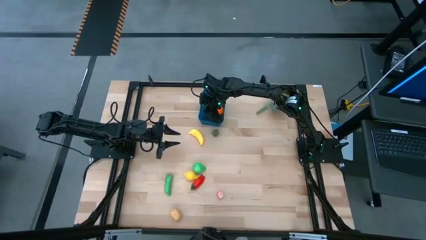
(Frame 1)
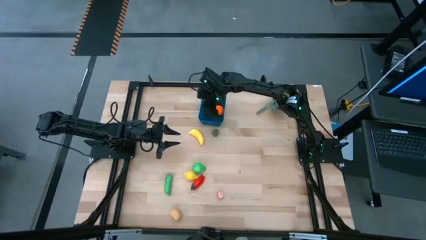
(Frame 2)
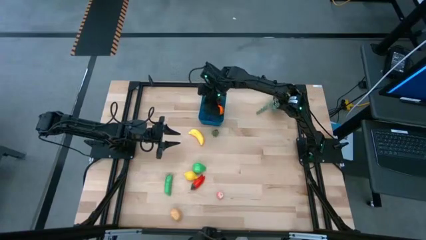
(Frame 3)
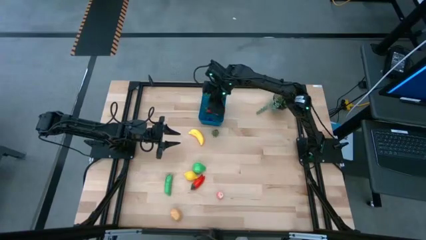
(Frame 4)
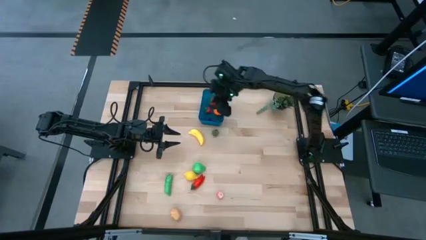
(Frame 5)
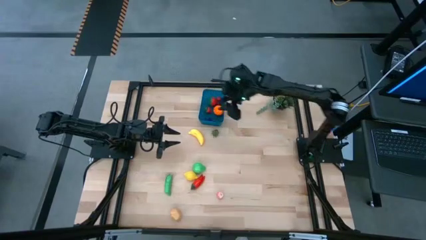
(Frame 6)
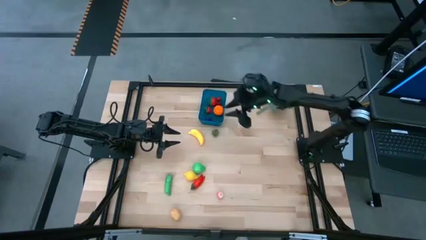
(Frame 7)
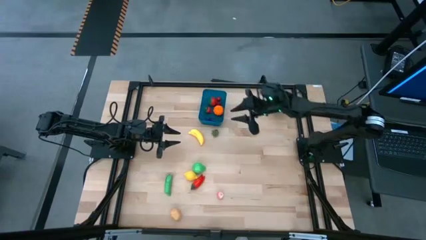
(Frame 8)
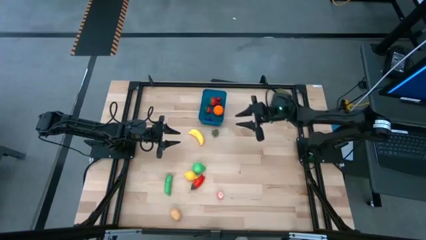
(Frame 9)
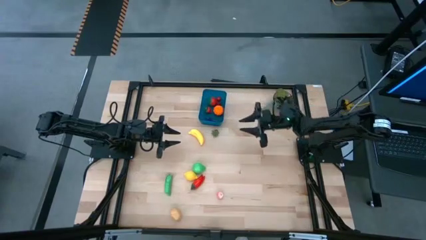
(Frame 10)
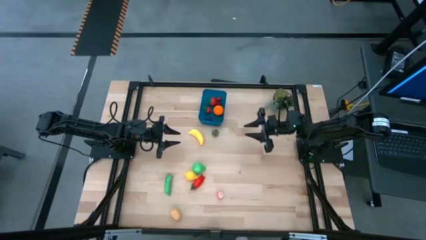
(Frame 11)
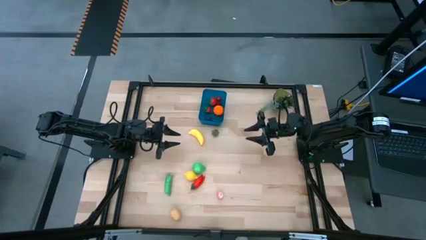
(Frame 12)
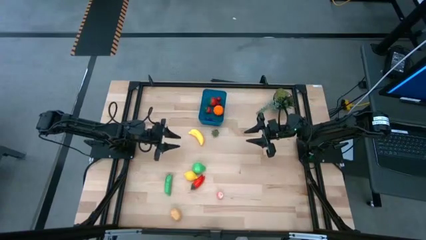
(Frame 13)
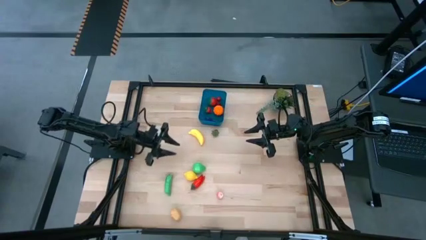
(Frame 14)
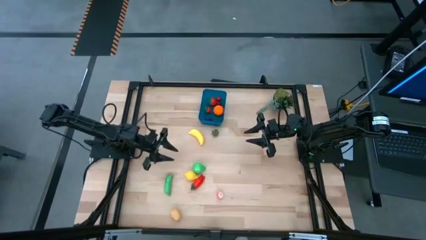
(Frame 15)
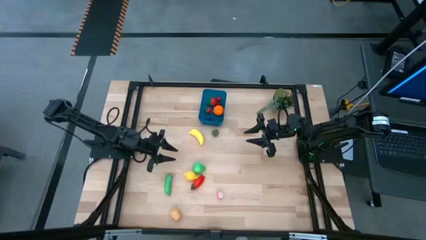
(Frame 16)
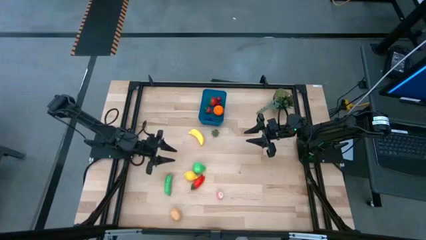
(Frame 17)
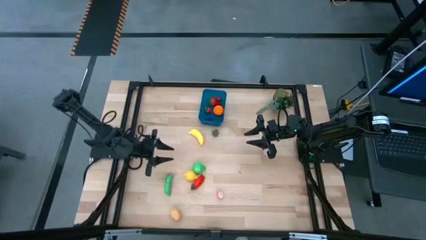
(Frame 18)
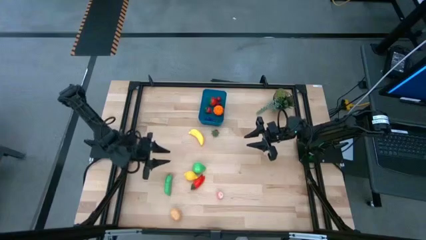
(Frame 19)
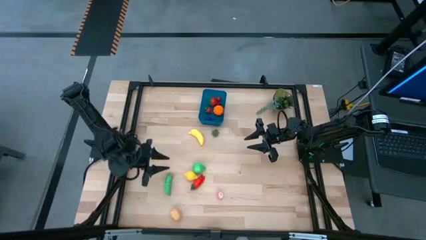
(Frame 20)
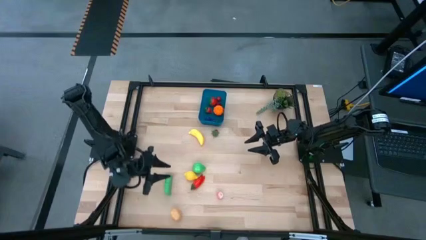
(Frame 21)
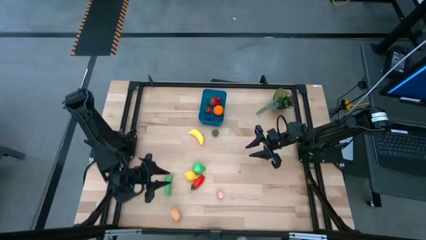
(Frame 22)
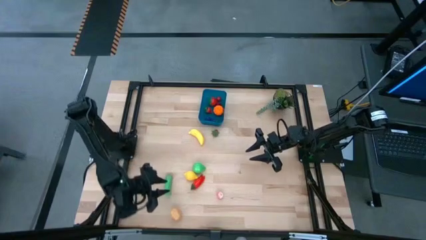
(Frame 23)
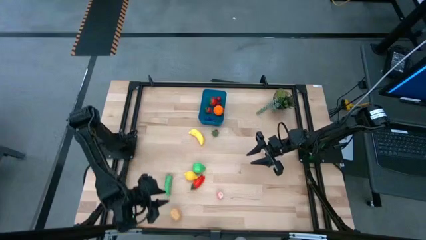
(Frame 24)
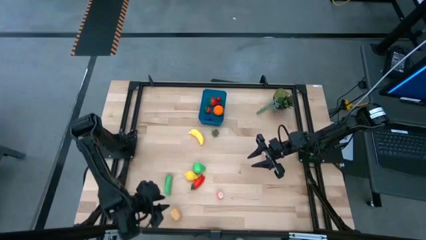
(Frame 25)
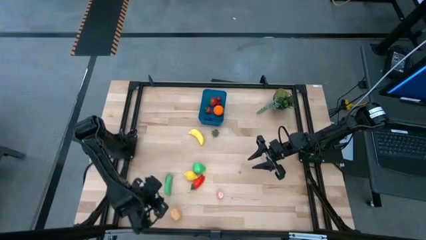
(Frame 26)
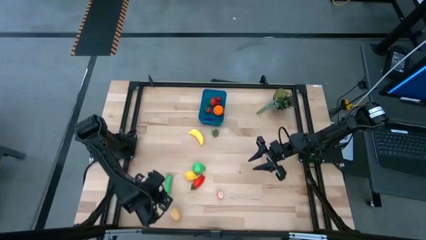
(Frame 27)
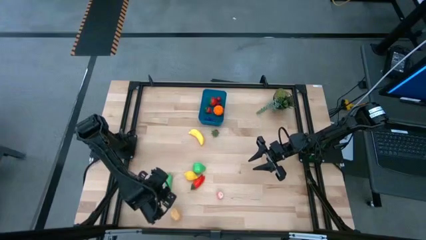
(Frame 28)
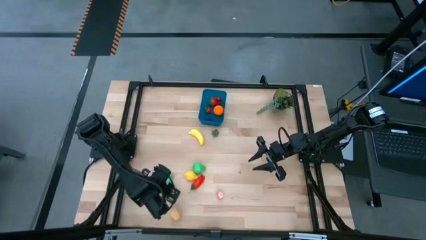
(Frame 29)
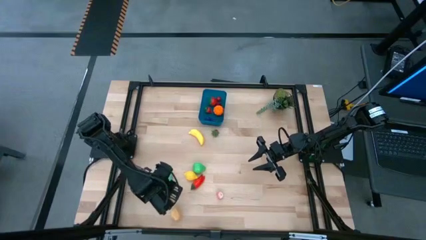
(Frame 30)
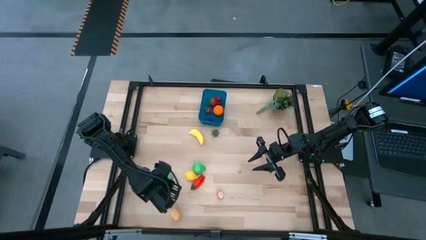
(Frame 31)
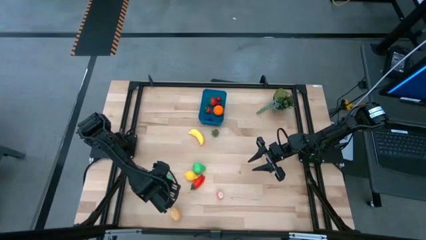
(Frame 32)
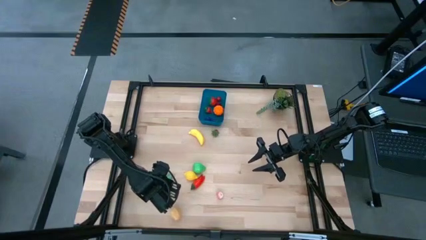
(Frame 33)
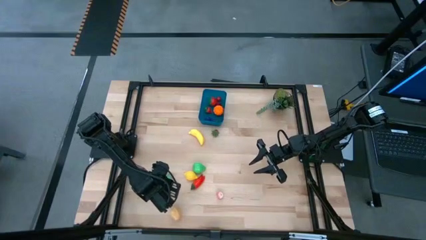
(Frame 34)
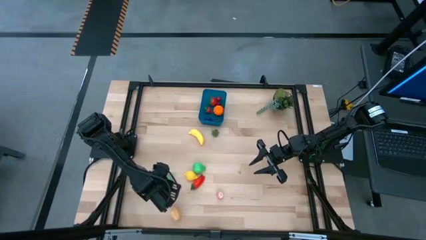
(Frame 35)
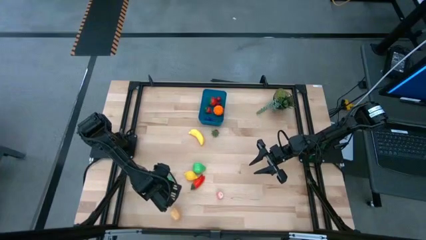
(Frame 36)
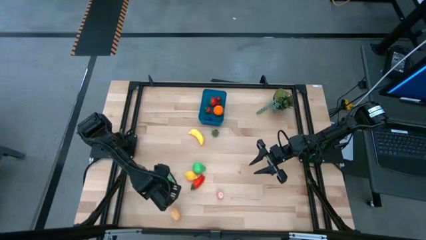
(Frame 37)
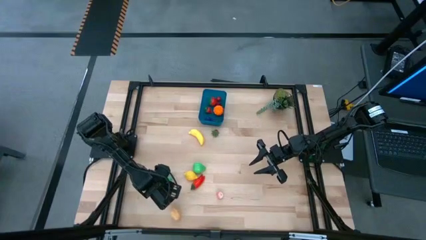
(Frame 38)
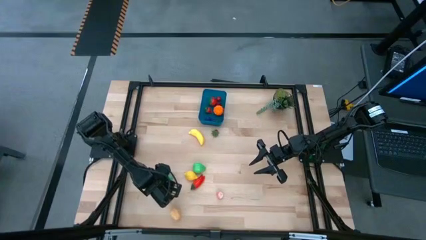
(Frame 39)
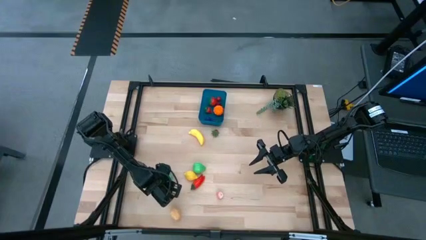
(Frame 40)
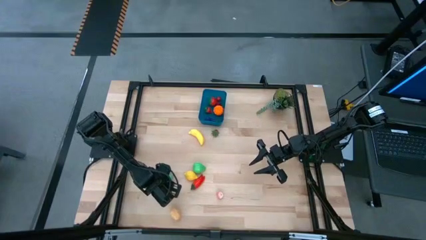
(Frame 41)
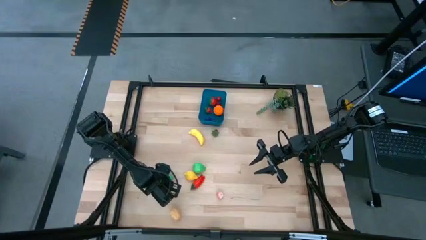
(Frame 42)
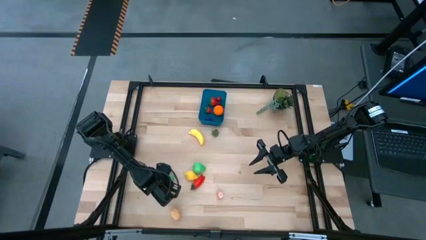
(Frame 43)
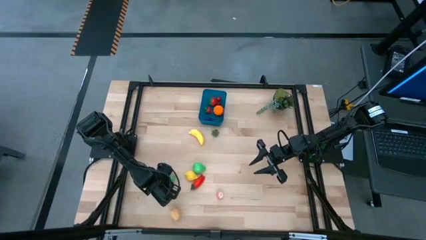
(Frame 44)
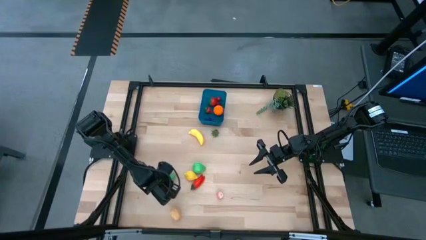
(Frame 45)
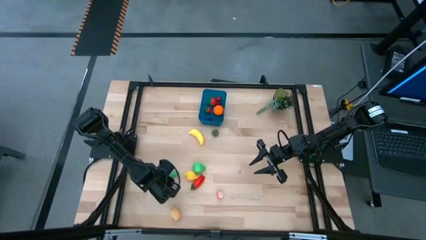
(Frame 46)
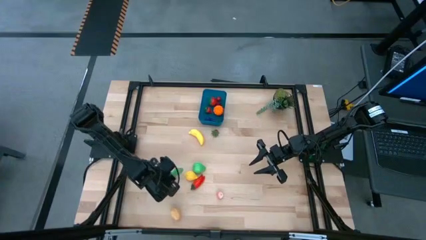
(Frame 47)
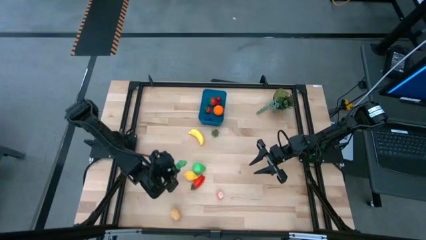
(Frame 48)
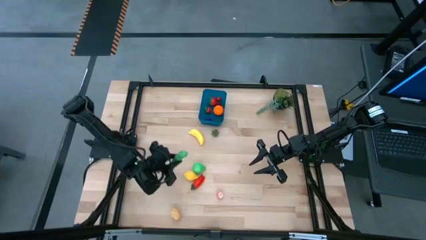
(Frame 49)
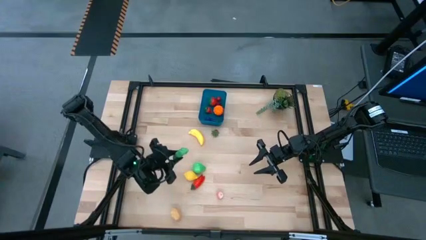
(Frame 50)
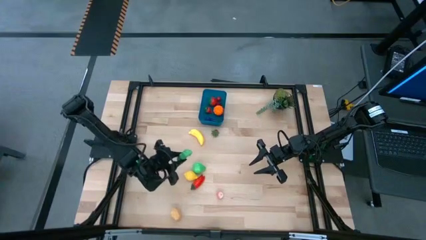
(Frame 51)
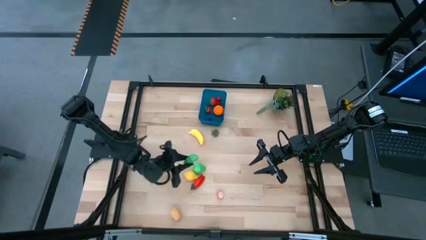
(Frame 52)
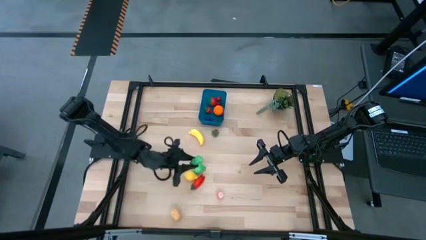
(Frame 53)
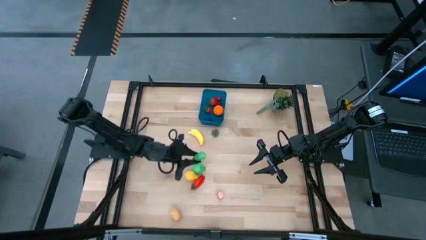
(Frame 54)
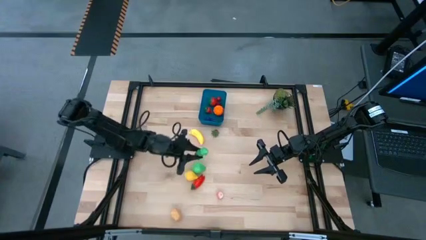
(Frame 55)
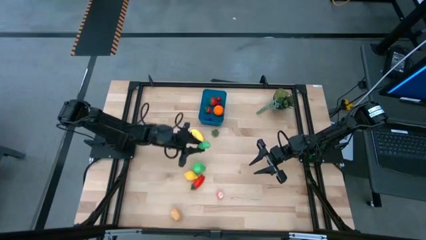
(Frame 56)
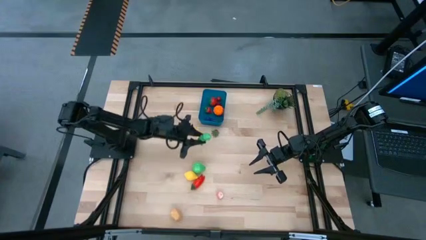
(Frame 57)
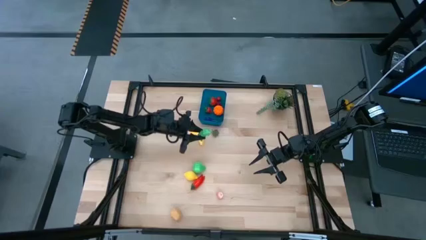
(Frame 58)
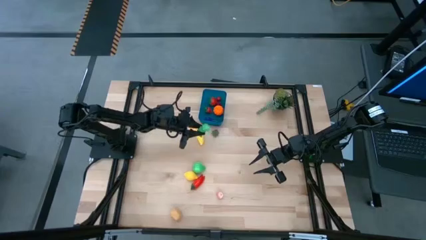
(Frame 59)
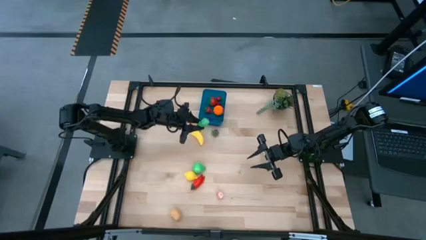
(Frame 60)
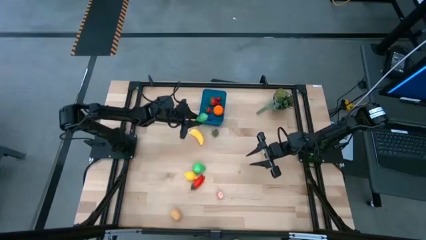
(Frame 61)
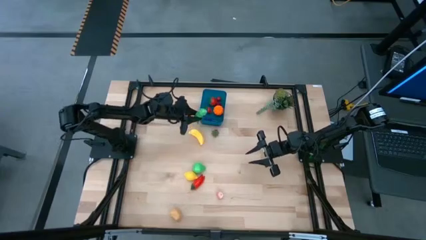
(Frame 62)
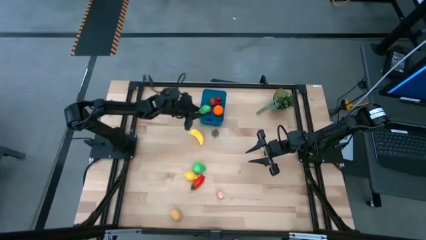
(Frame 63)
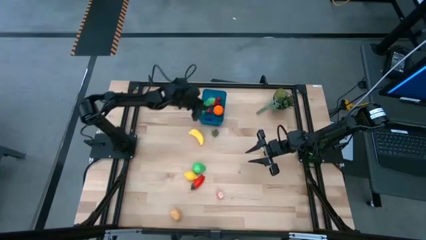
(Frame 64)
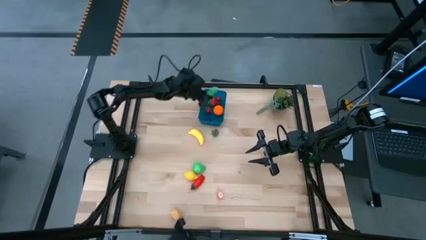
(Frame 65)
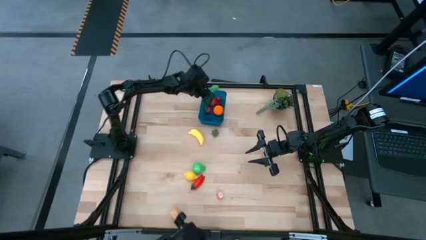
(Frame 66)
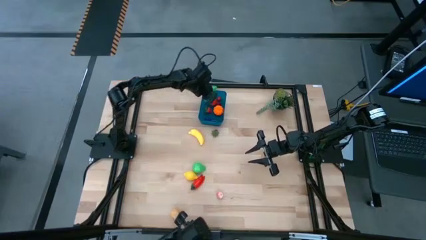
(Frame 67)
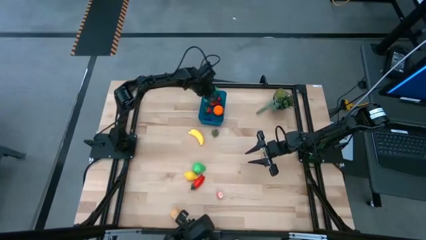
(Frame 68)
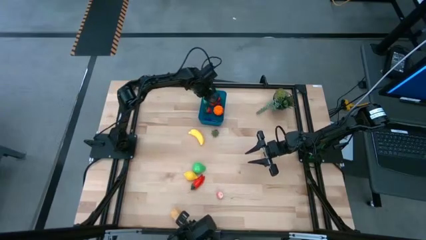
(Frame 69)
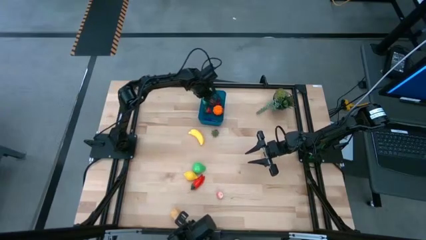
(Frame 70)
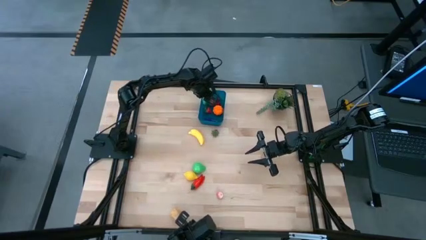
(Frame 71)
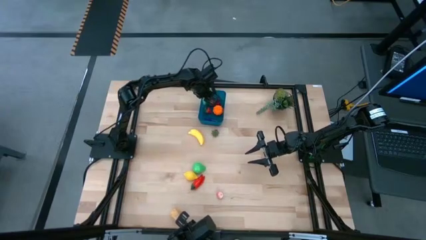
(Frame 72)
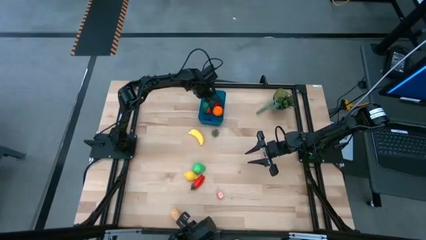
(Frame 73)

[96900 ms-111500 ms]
Task: Pick and placing Produce into tupperware
Put the pea into the blue bin

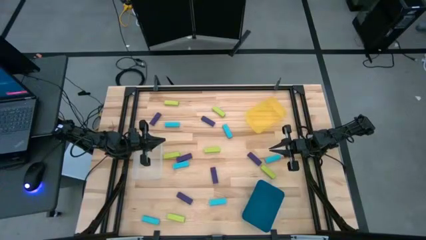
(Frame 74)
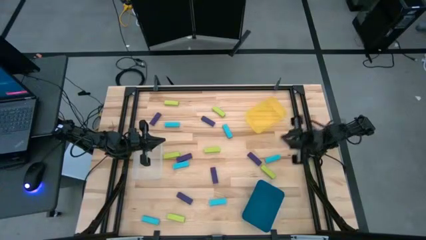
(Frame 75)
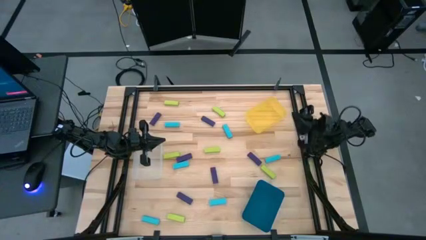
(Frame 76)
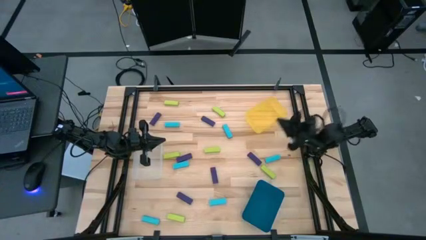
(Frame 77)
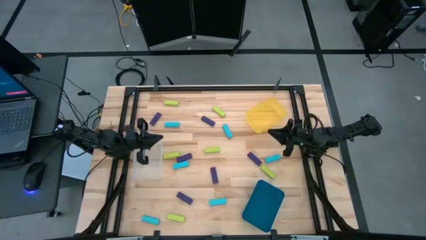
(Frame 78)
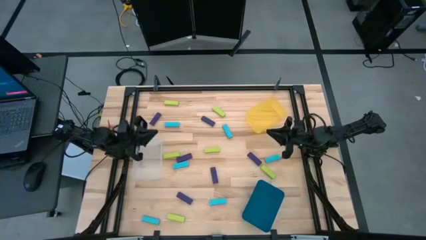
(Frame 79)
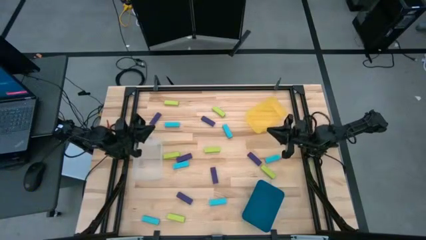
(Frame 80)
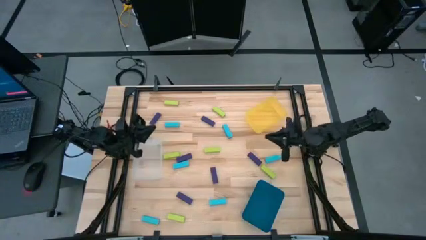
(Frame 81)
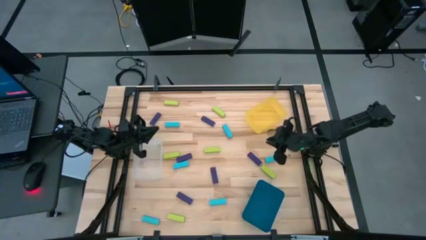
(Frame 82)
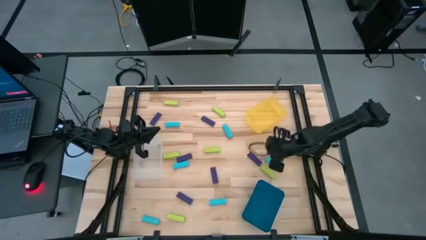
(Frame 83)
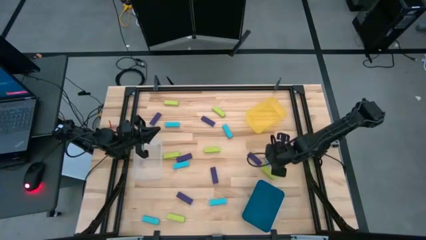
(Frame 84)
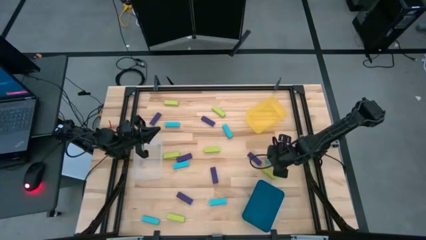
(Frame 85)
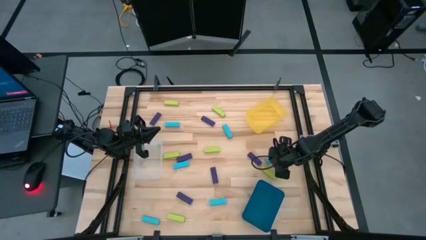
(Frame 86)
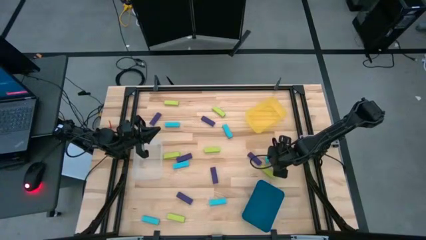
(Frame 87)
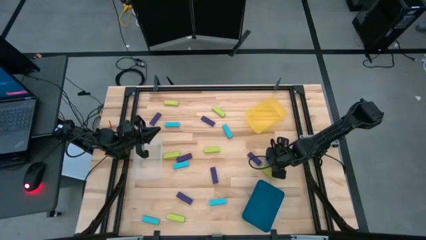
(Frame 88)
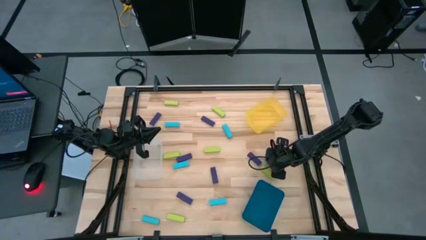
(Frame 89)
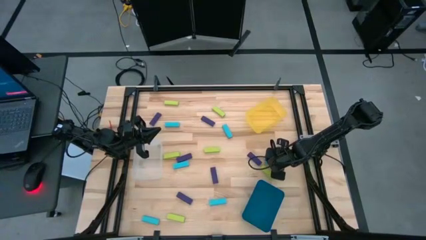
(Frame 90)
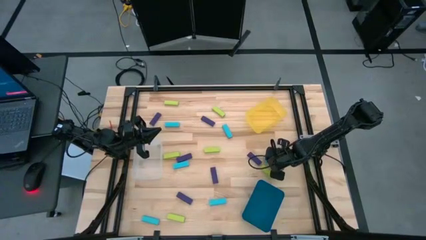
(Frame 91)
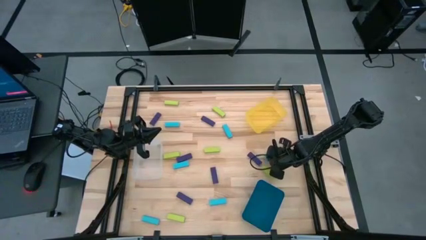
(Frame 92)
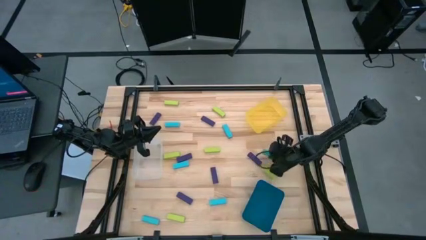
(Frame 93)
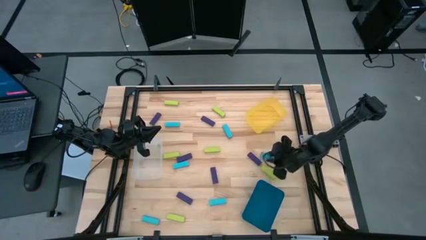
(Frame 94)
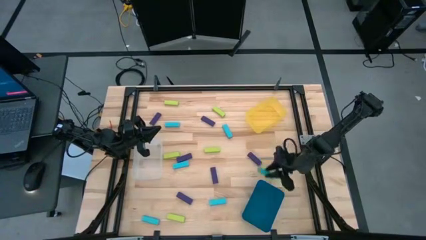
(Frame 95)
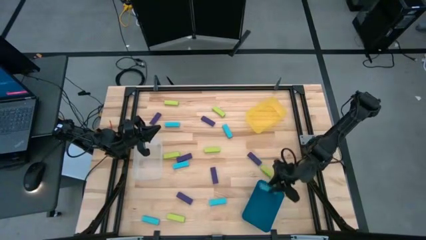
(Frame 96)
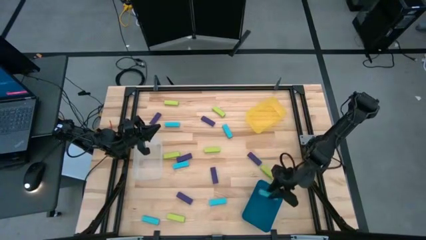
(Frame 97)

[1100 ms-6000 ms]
Task: Sort blocks
Put the light blue block into the blue bin
